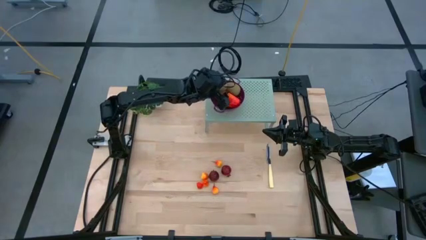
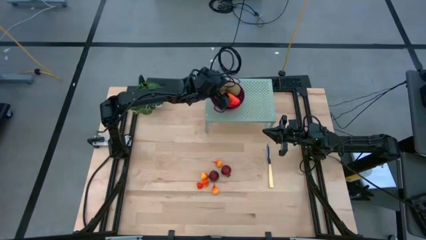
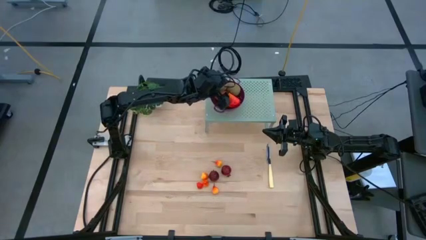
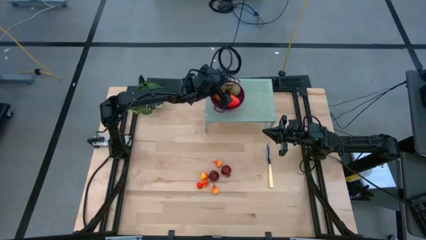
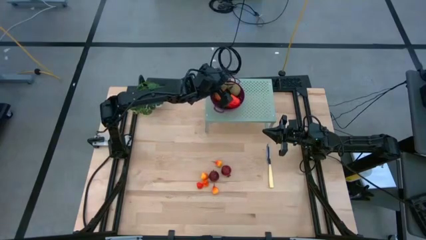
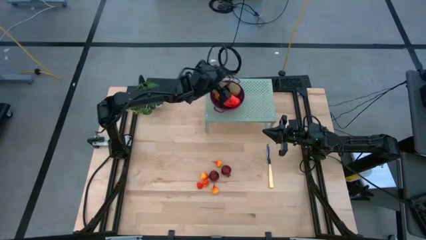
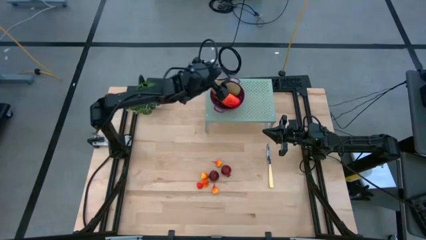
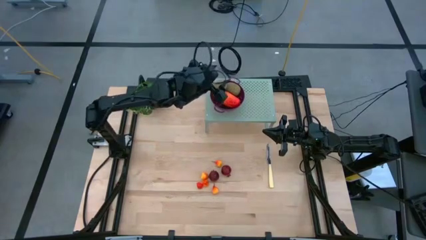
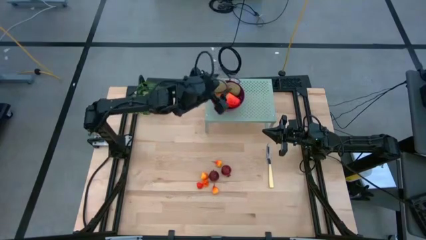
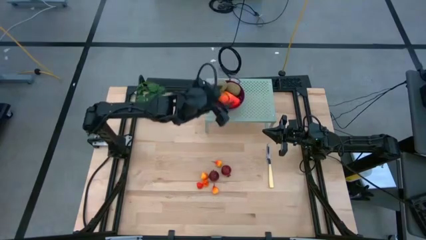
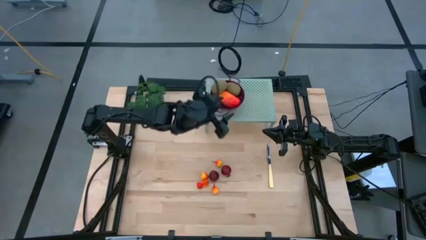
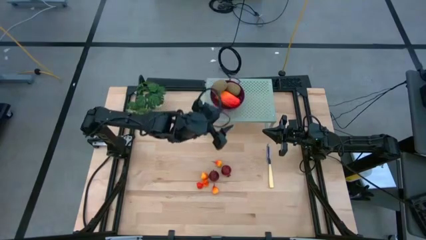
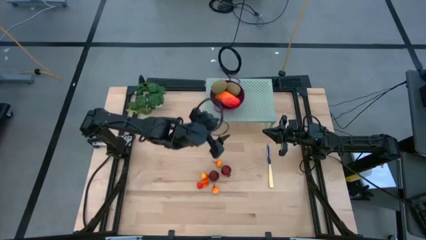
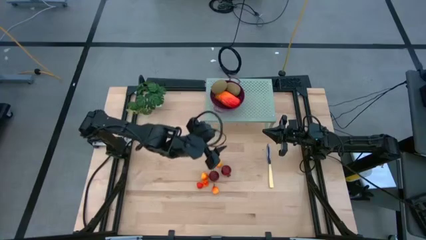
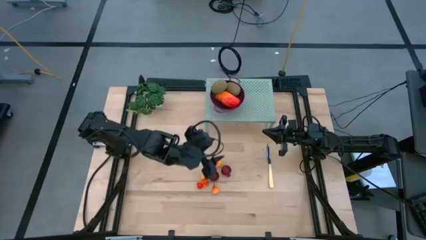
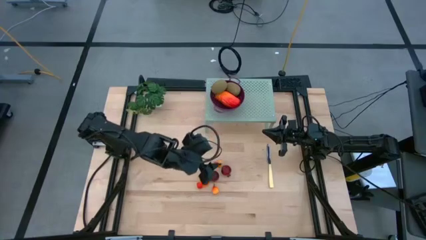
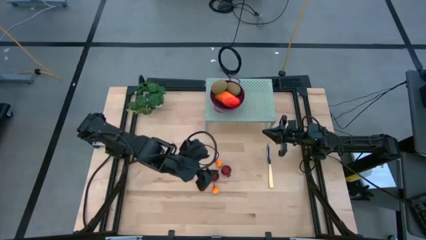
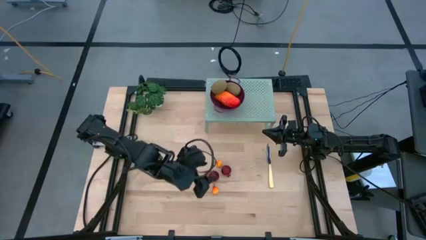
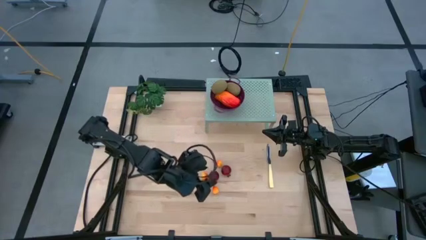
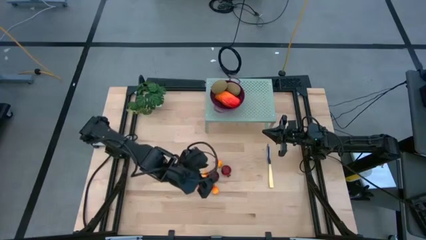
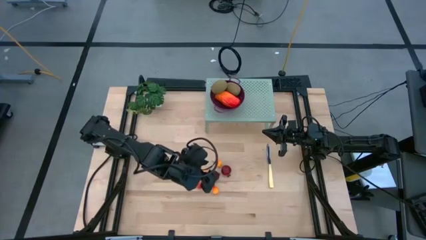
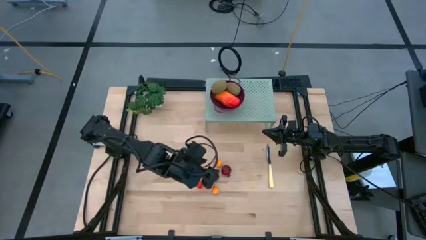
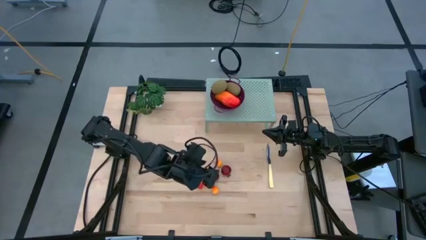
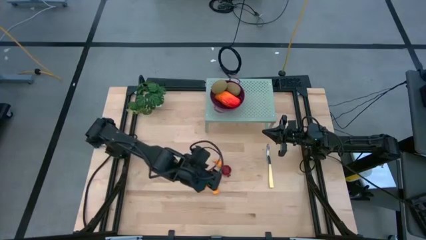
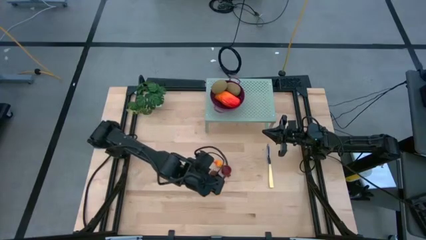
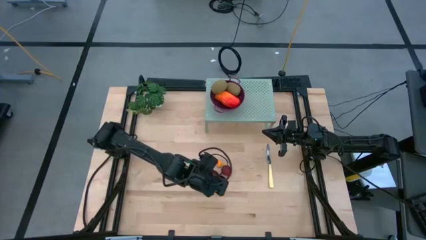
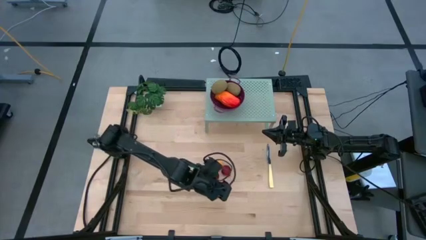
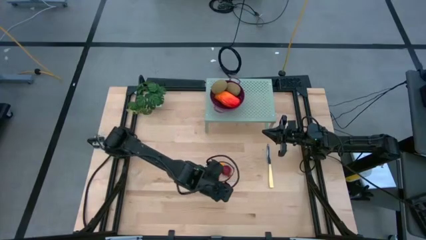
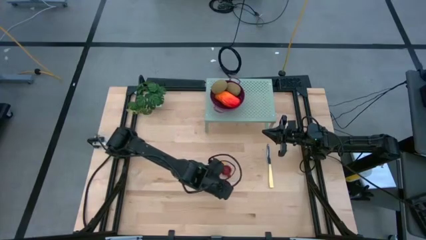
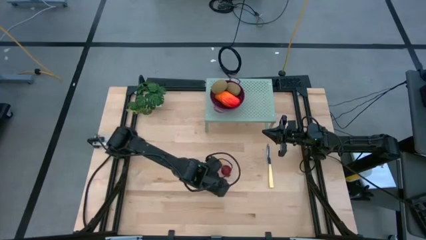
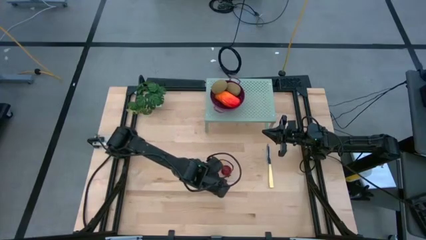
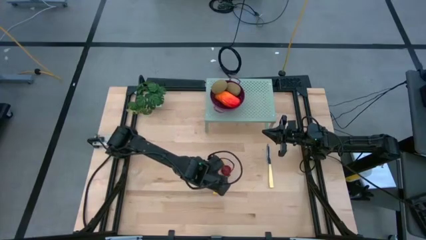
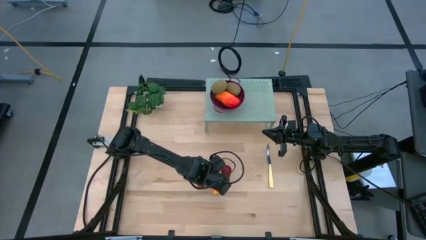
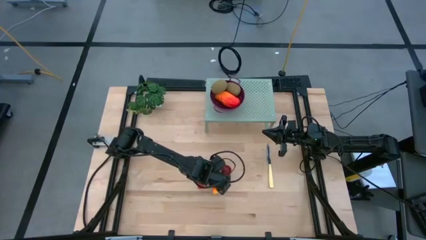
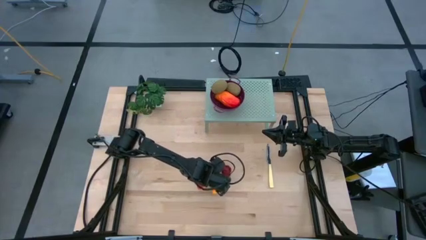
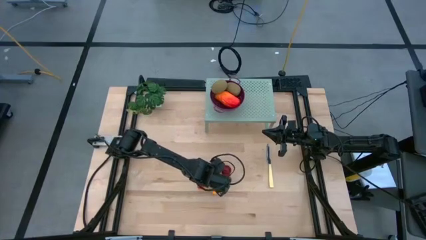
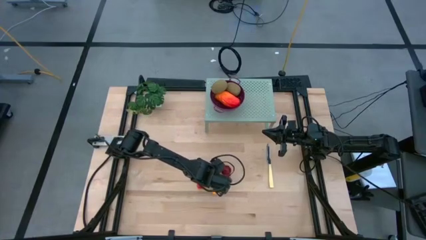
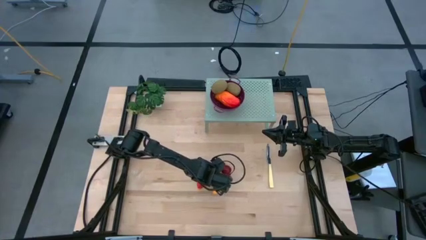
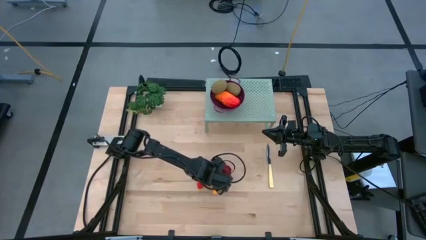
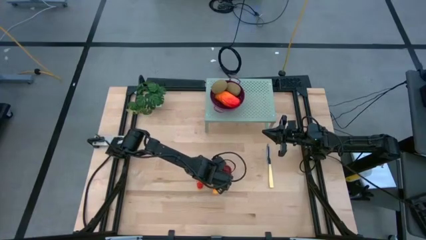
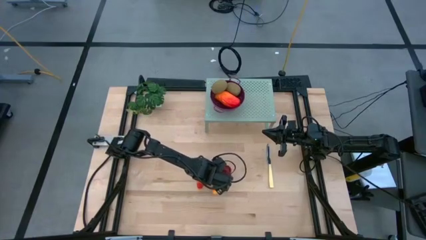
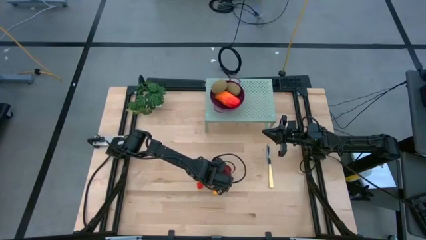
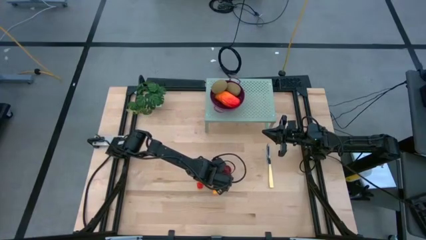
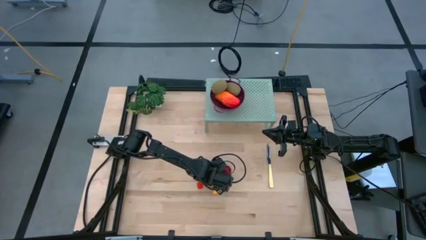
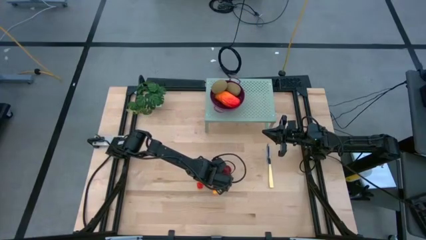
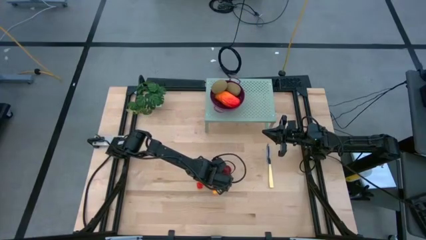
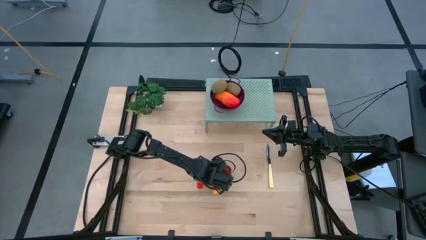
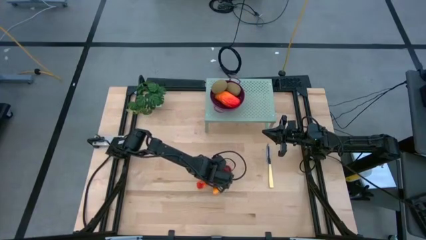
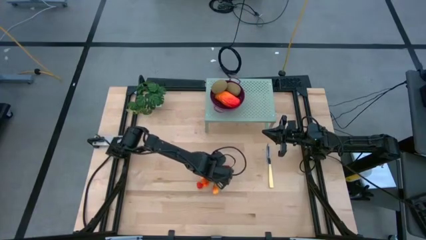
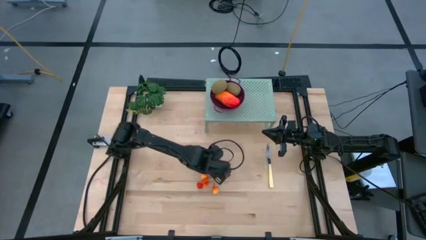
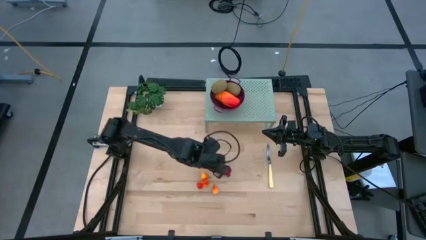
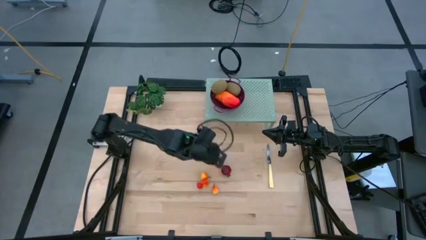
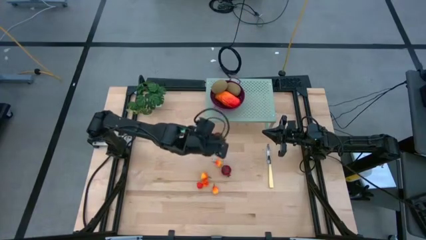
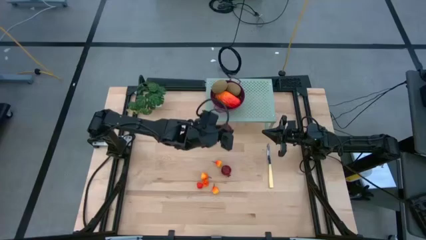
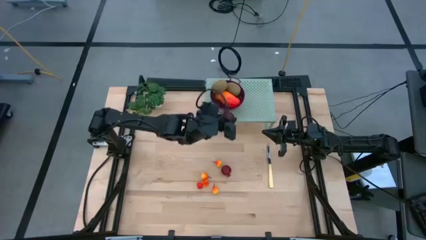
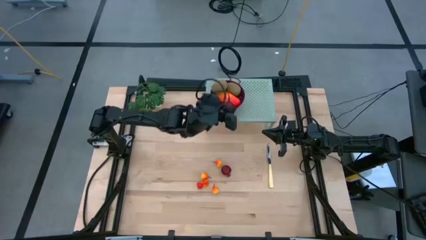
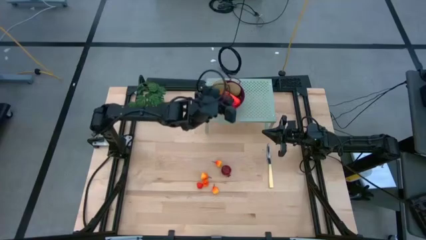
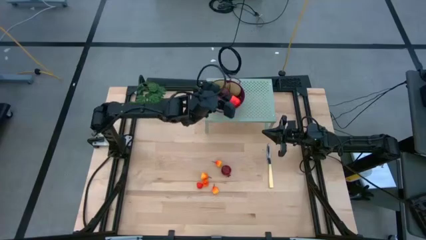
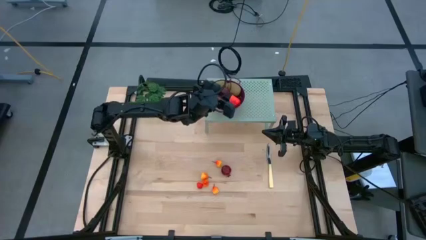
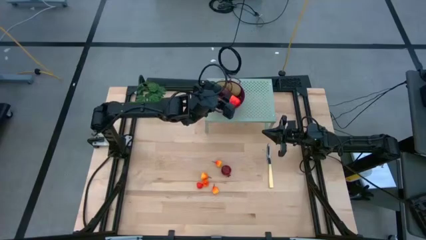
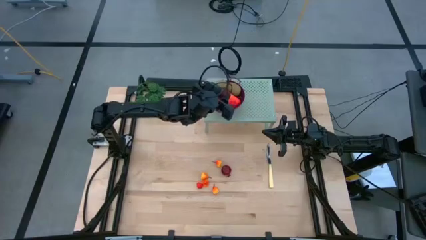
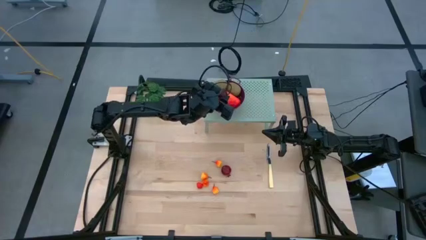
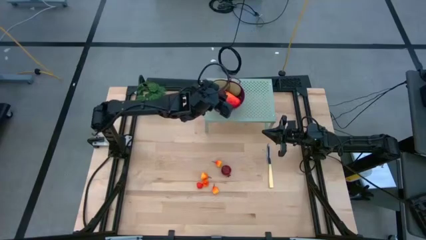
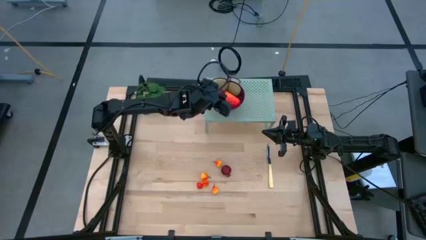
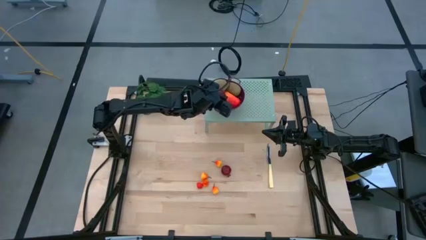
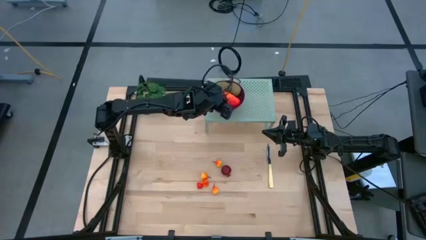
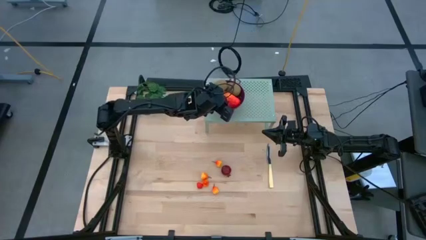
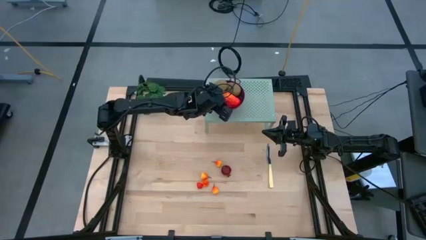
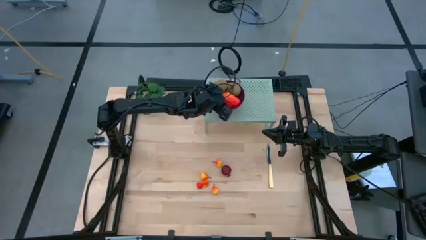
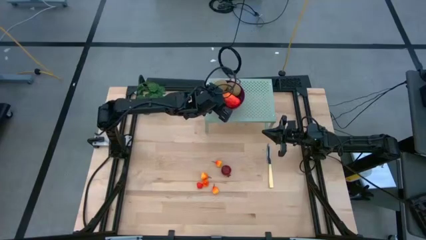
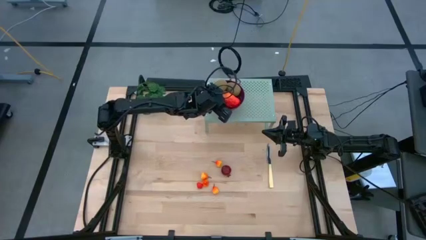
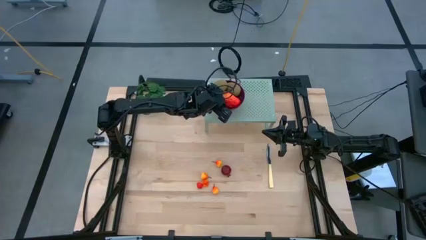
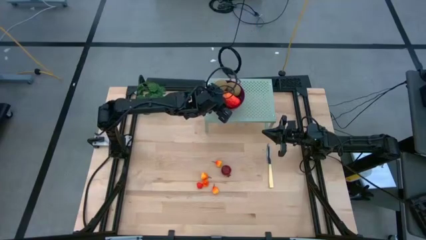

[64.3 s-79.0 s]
Task: Pick & Place Fruit
Put the pomegranate into the dark red colander on the shelf
